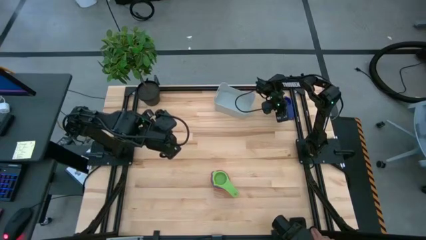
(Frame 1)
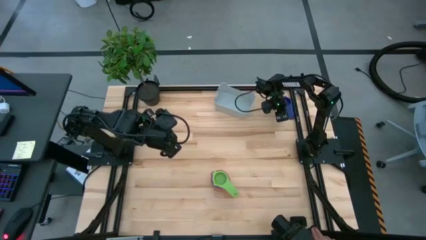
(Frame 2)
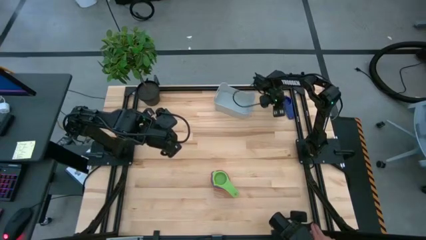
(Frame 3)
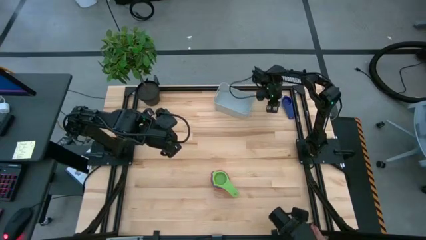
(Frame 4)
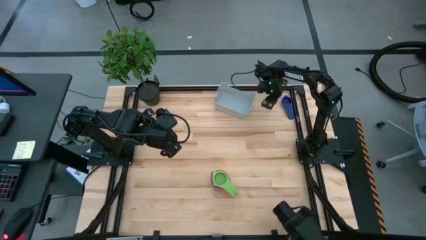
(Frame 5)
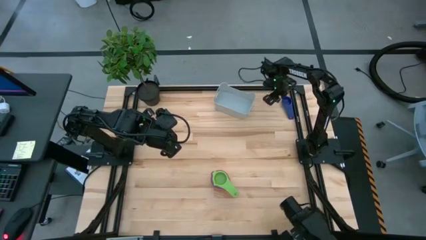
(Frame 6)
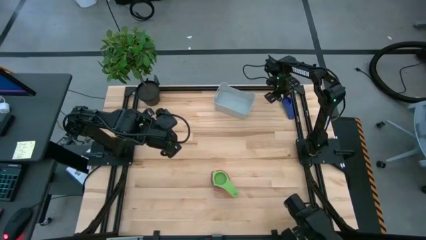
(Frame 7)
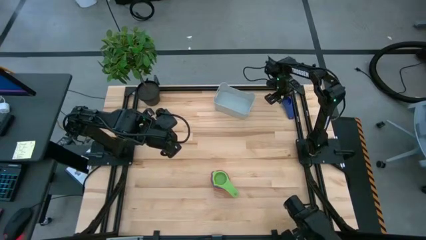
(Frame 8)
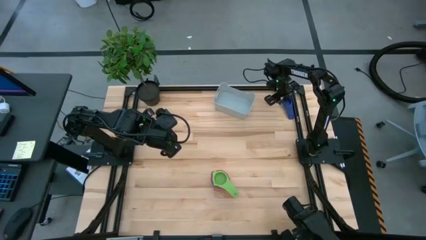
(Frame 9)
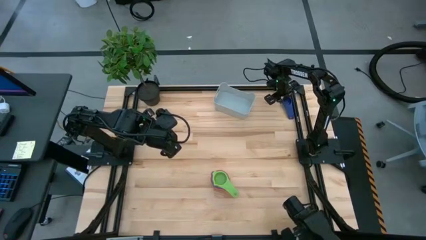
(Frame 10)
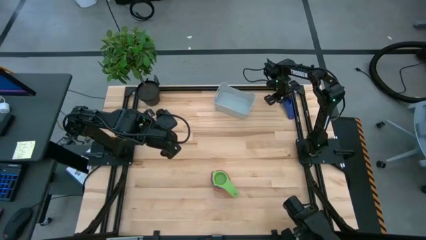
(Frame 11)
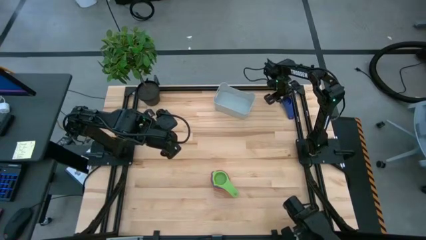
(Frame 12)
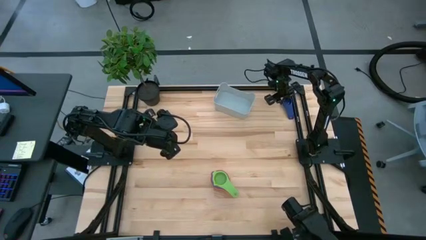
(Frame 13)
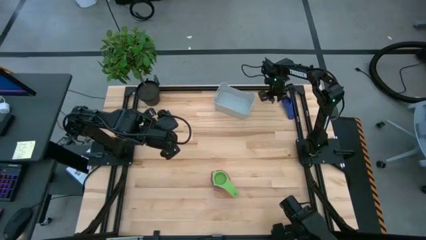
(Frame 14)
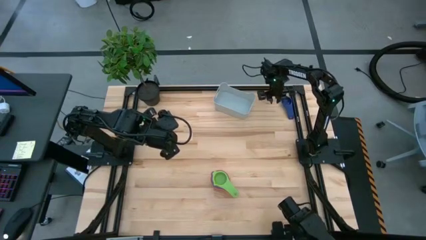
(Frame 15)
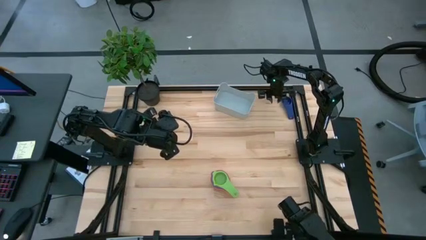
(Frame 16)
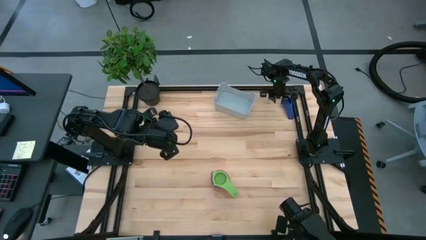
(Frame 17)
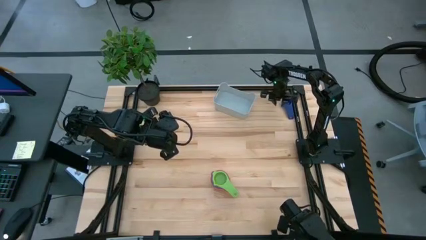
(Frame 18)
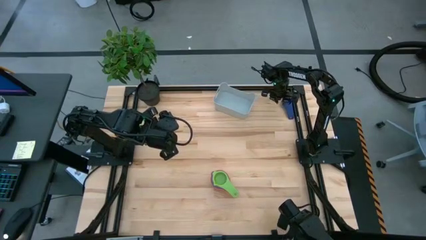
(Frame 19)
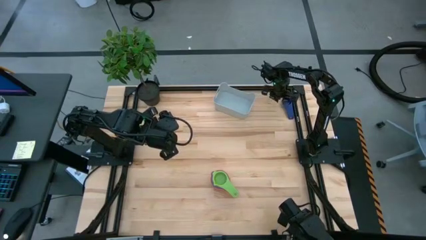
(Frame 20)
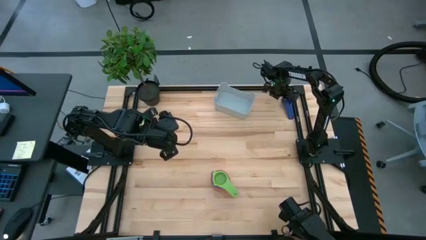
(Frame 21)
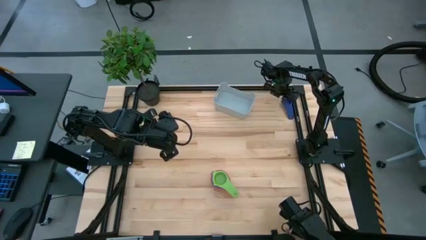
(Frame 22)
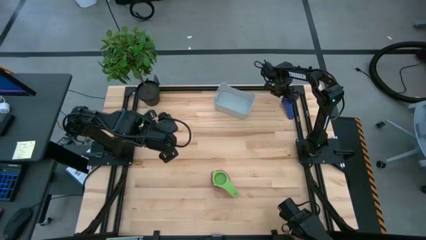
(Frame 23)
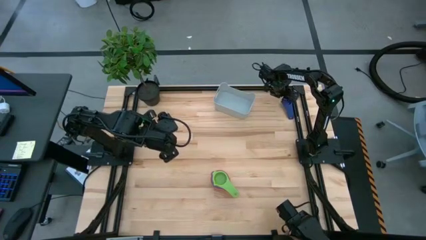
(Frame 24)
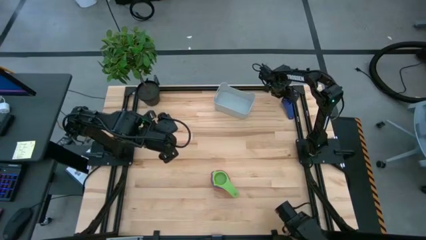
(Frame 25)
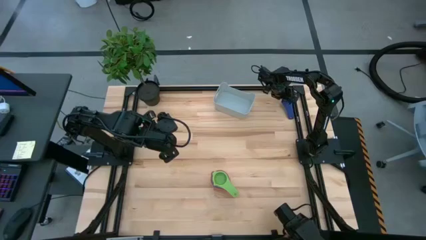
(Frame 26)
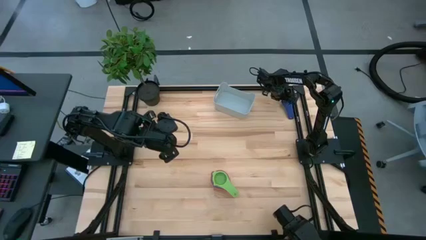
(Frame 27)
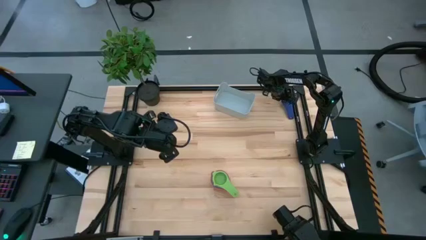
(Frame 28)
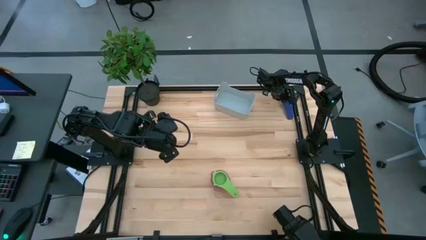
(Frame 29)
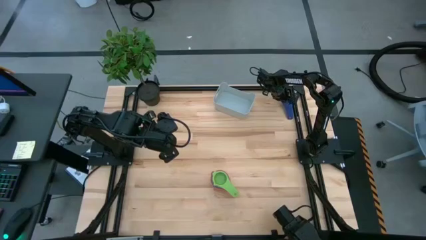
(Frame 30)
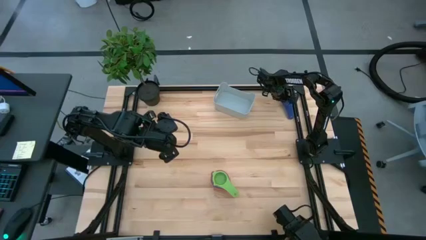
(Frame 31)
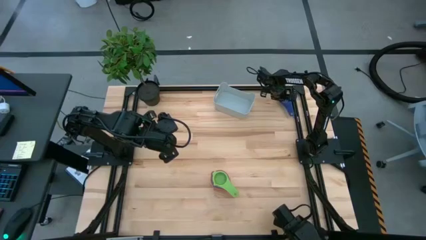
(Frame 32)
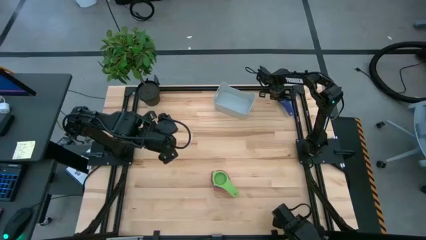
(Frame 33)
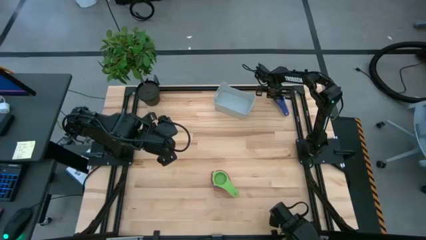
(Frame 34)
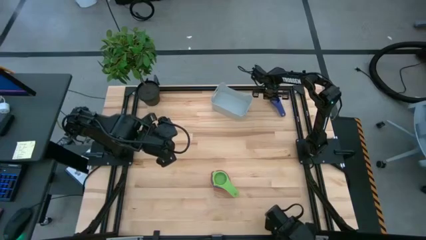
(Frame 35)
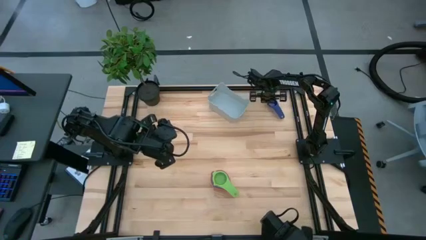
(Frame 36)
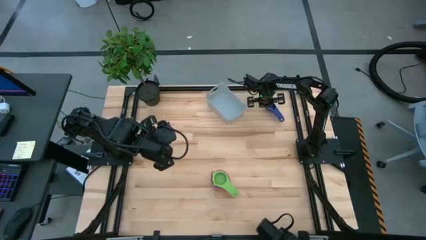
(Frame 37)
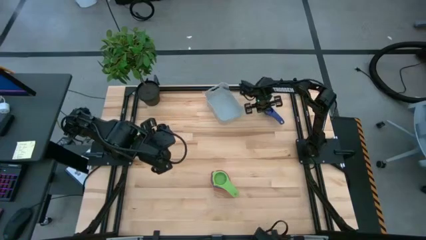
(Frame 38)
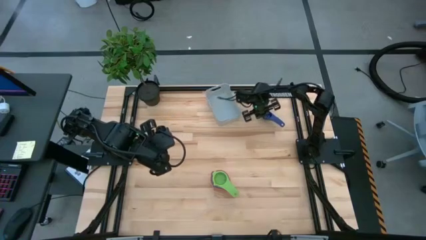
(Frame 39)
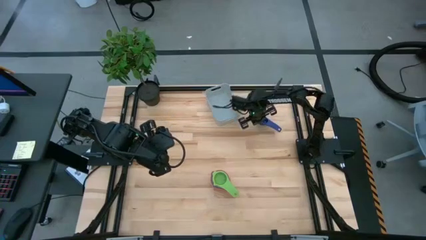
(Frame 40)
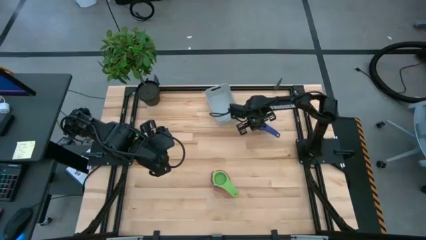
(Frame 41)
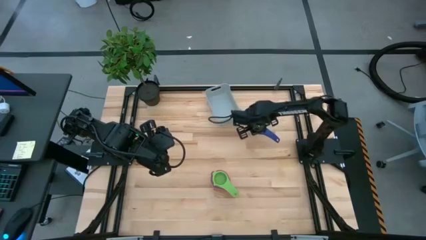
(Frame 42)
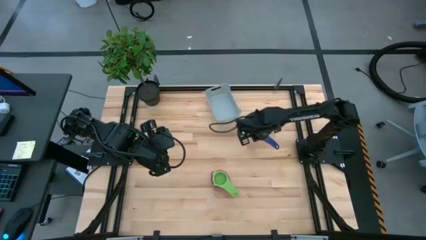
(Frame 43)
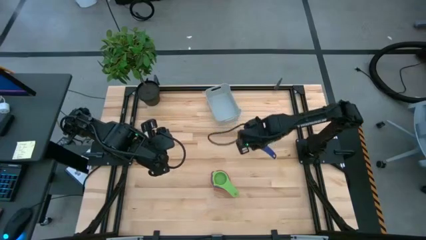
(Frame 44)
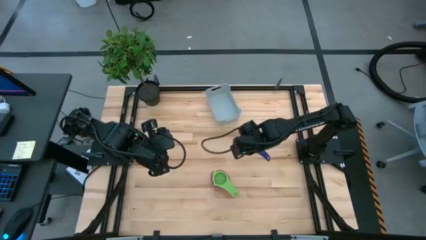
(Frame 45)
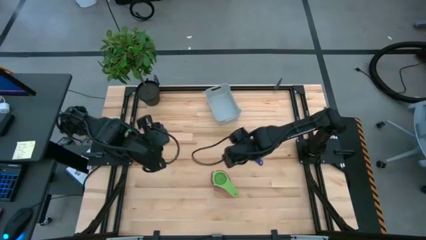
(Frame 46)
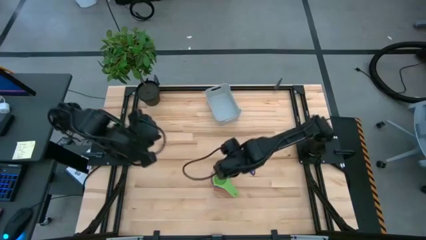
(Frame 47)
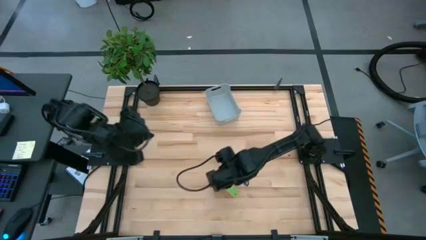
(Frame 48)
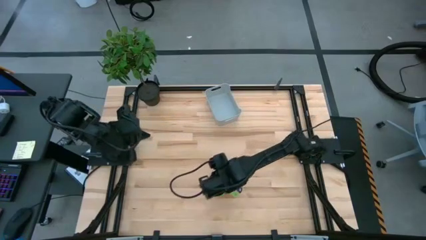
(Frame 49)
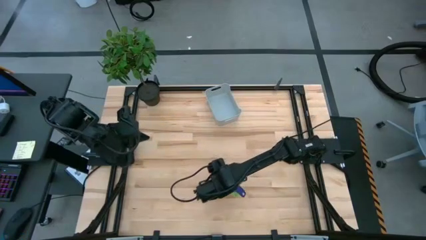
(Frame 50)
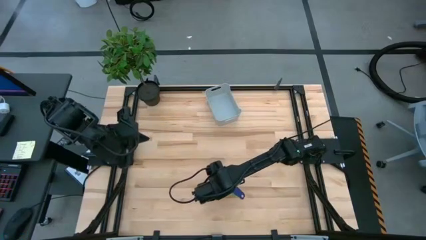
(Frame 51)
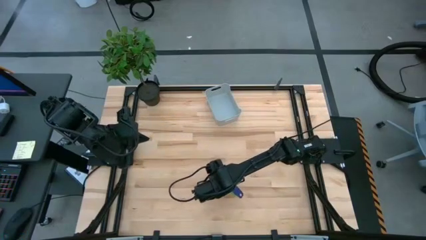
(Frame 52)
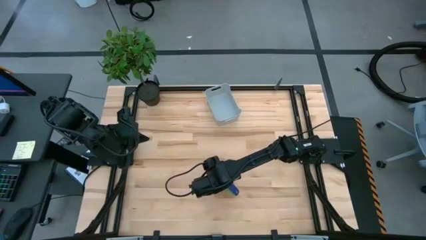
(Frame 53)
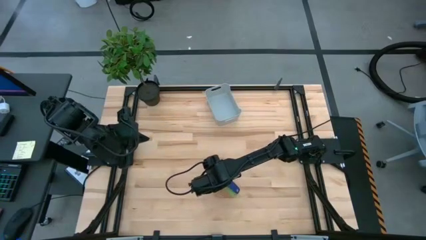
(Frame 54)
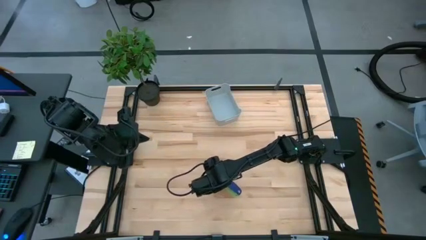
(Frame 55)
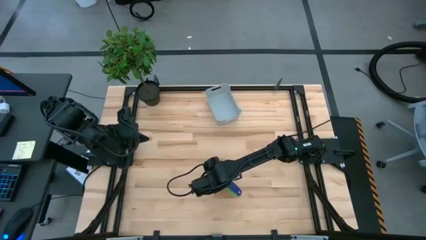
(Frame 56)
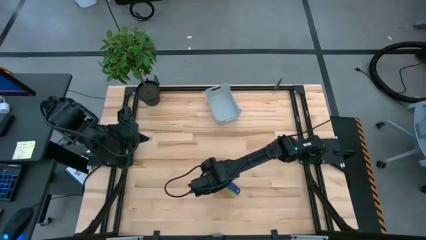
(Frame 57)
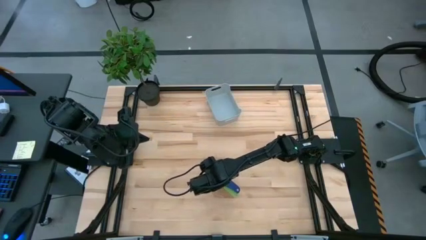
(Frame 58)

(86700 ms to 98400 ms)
Task: Nest measuring cups in basket
Stack the dark blue measuring cup on top of the green measuring cup

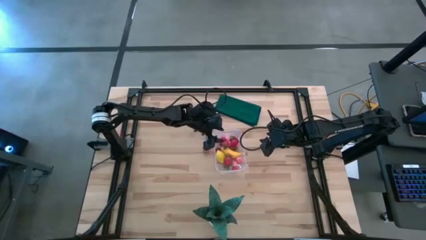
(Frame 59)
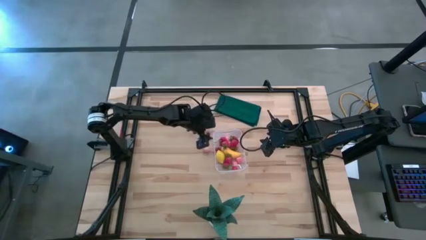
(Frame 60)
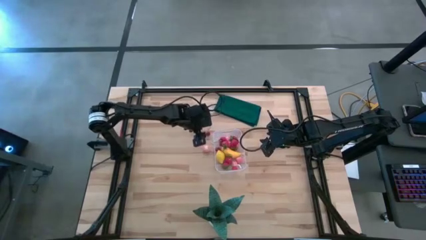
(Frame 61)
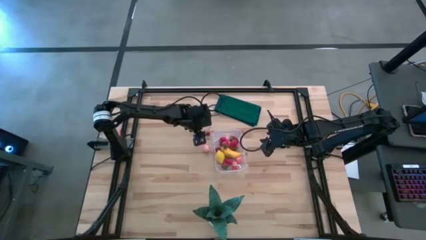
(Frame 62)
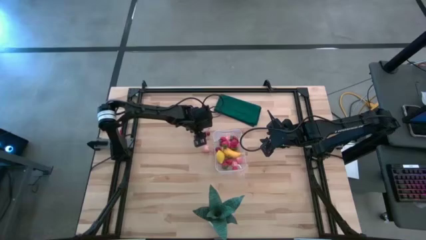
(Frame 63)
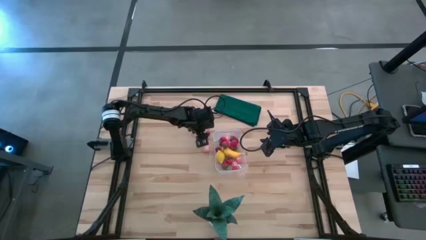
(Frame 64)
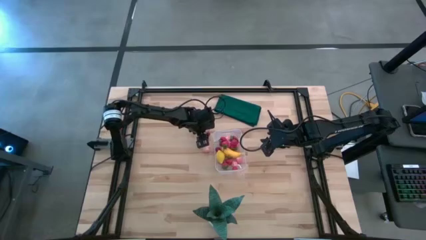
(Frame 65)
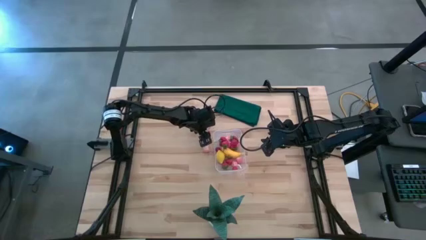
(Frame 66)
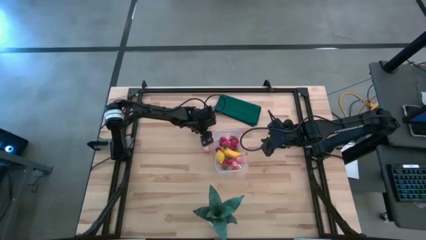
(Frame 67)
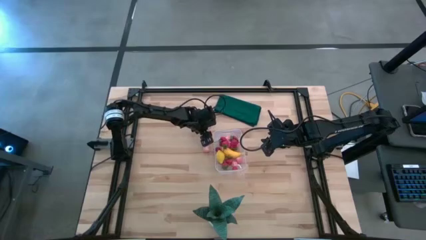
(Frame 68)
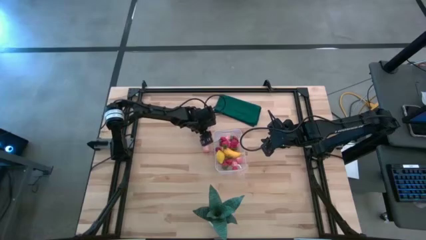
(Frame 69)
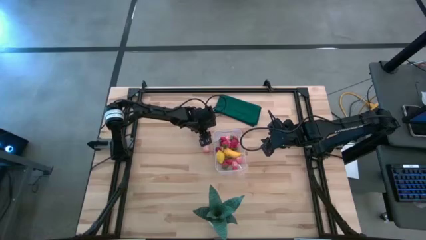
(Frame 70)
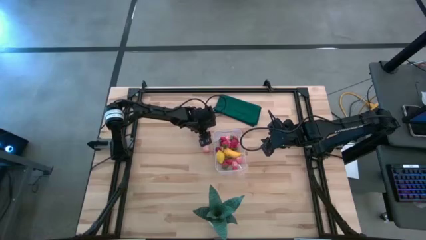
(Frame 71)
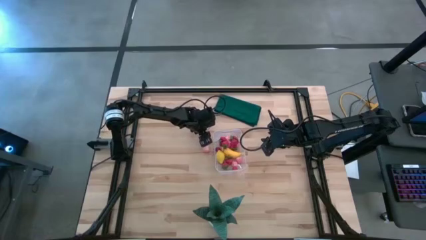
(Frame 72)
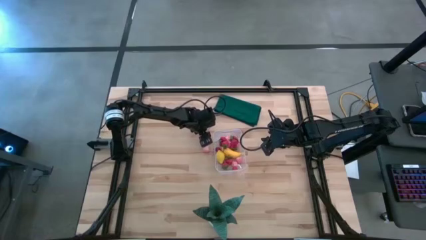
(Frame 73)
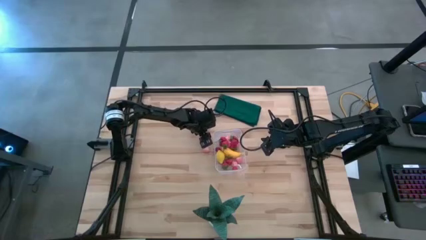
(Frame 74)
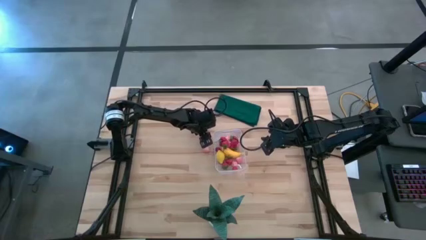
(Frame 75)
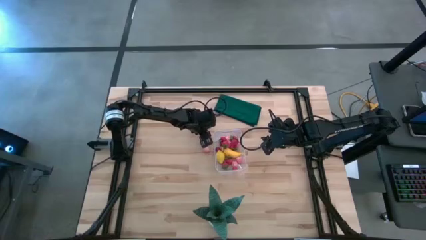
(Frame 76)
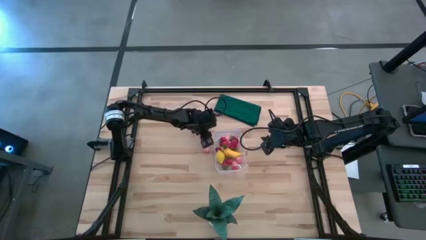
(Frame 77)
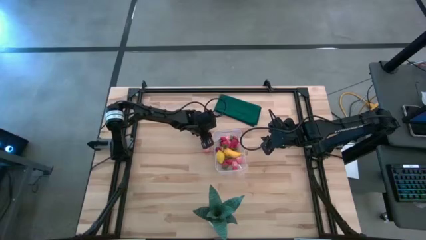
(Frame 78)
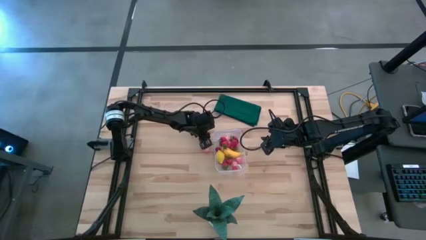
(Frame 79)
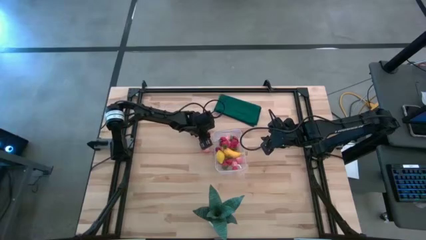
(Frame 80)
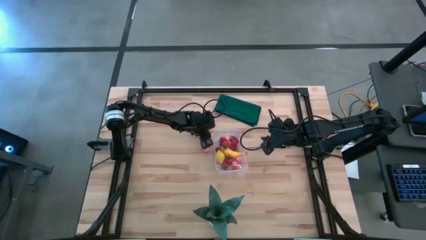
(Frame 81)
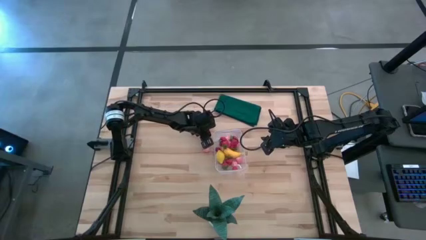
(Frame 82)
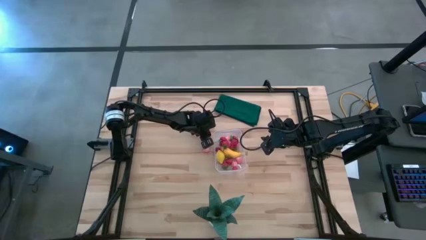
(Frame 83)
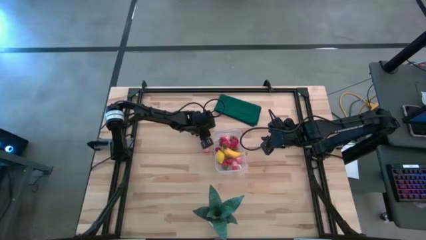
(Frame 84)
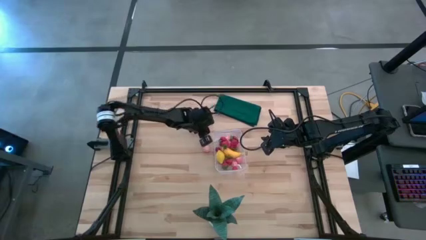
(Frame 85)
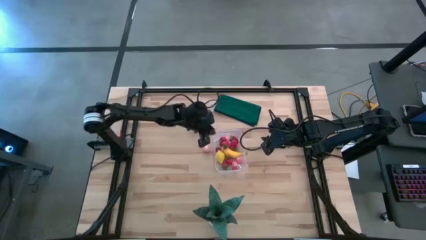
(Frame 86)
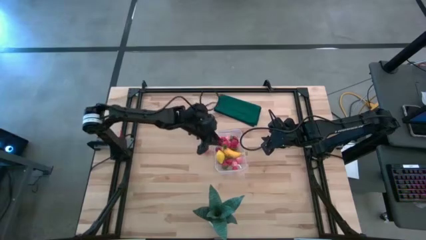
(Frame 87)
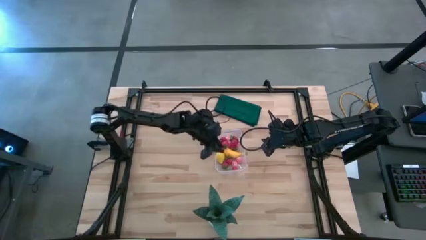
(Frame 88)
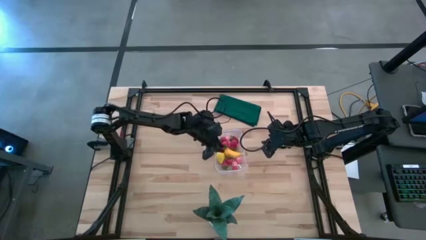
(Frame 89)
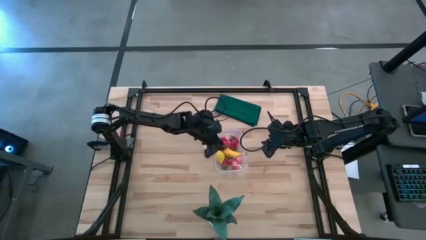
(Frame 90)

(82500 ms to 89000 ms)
Task: Pick and placing Produce into tupperware
Put the cherry into the transparent bin
